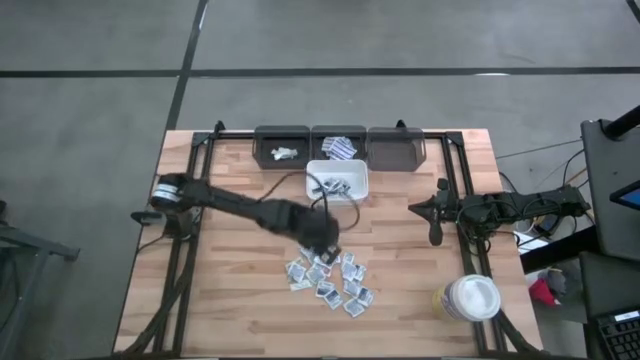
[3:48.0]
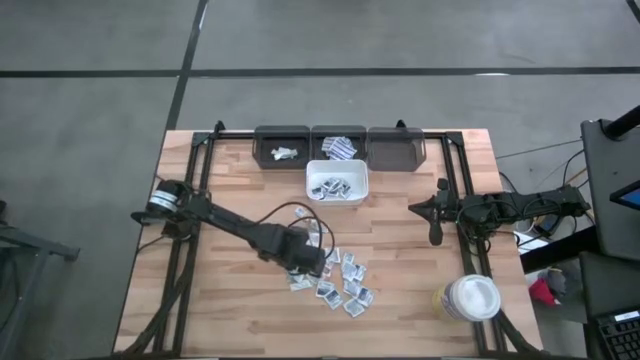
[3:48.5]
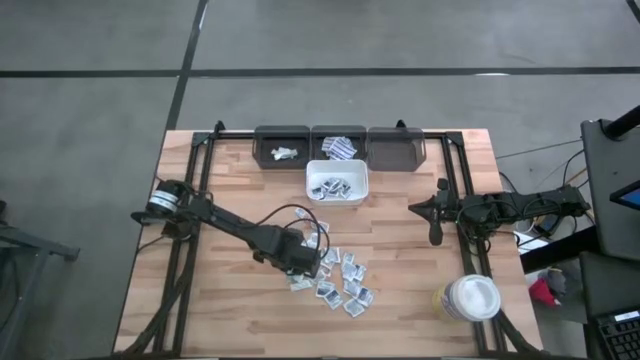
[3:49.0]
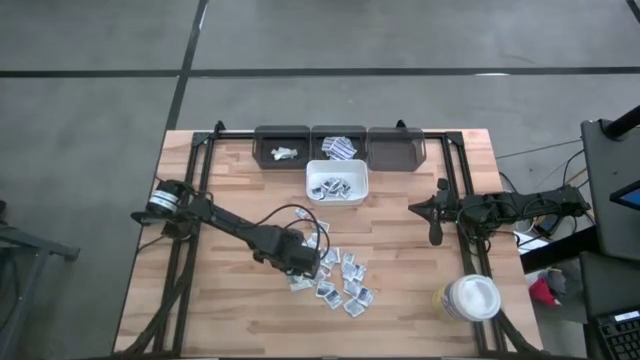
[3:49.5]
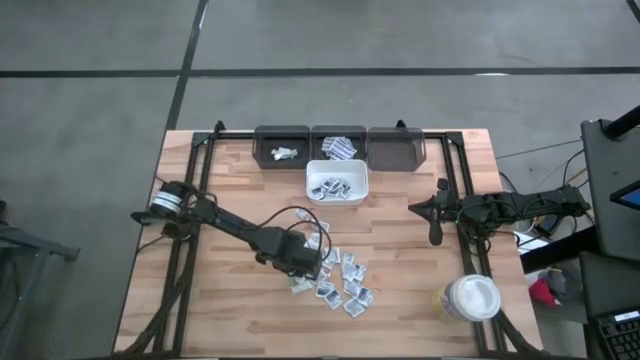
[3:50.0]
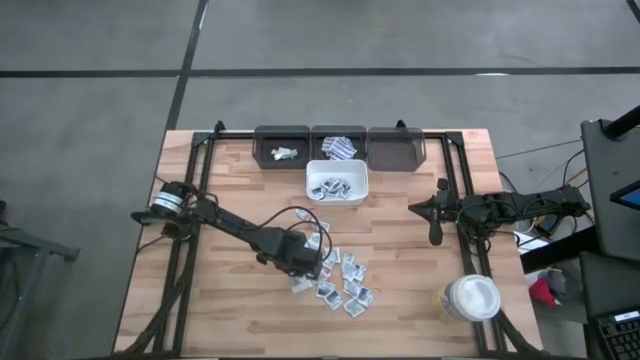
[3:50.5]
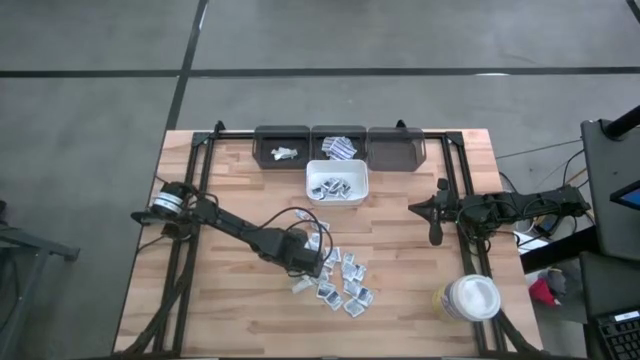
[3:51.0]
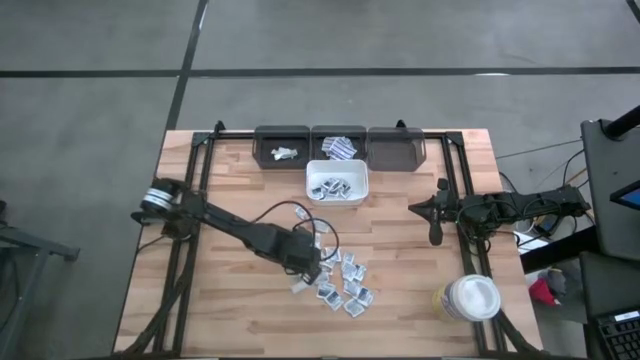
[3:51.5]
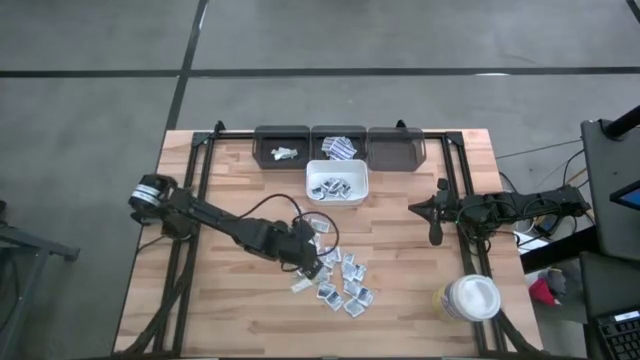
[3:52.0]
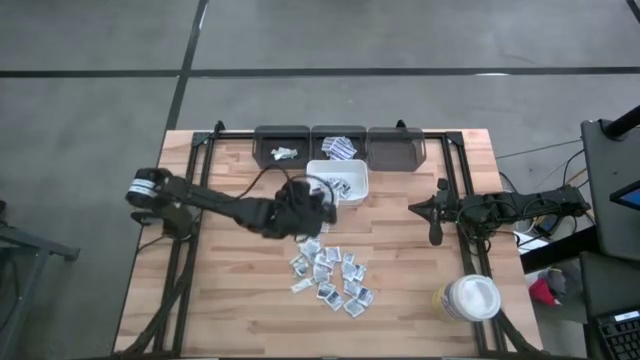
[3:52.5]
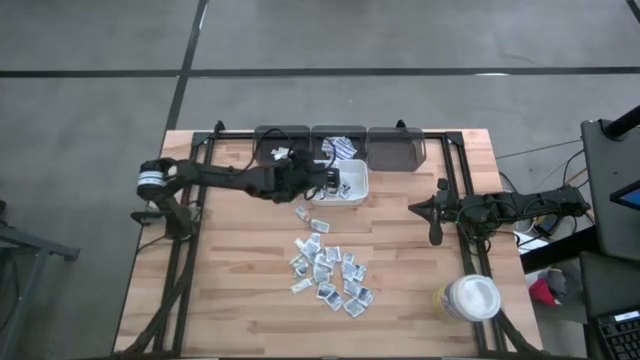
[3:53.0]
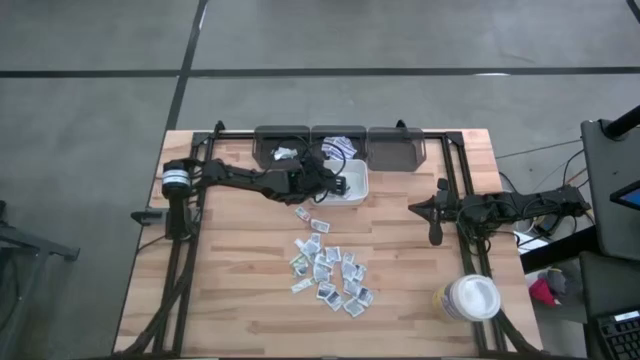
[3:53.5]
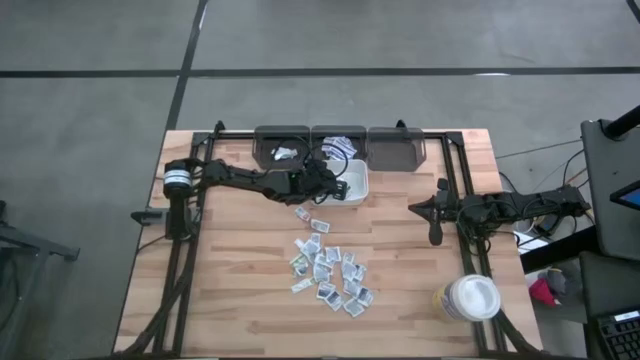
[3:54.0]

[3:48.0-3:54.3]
Task: Pick & Place First Aid Supplies
Put the blue alcohol pad into the white bin

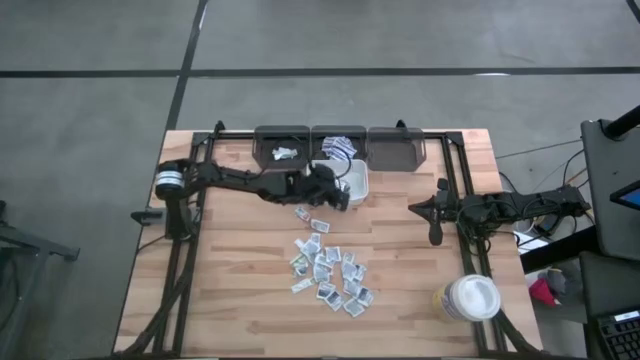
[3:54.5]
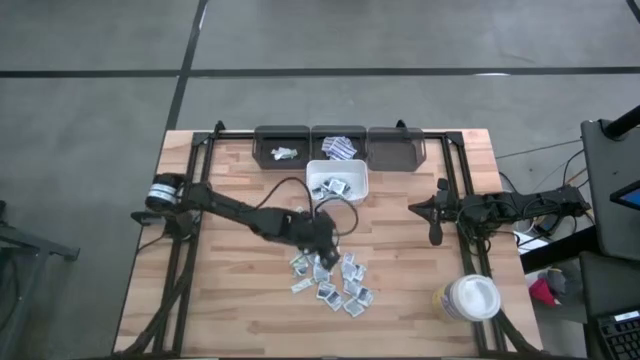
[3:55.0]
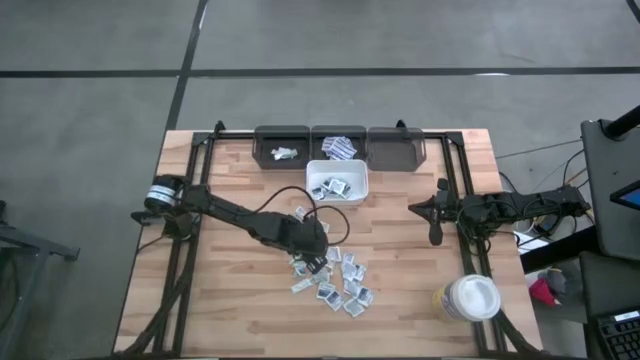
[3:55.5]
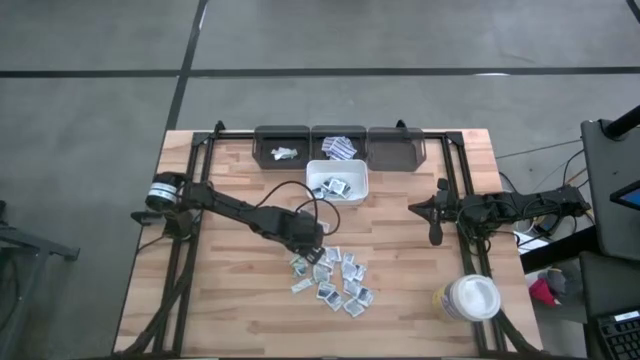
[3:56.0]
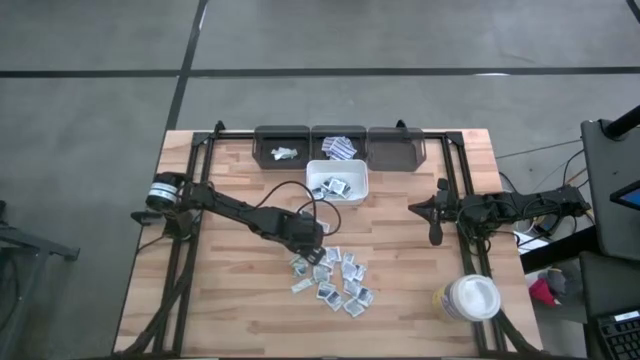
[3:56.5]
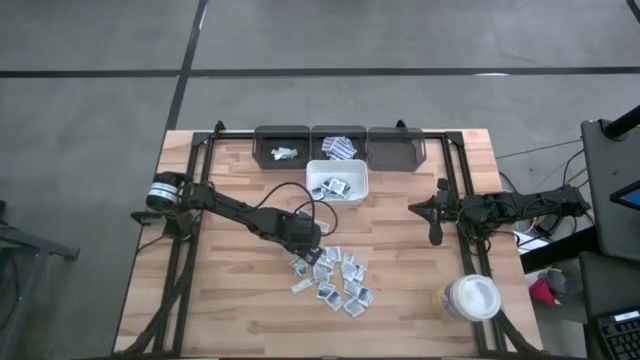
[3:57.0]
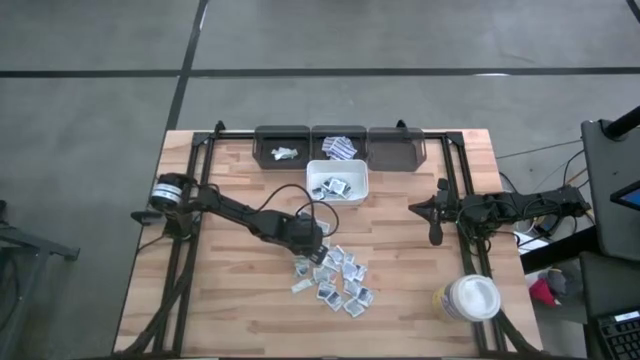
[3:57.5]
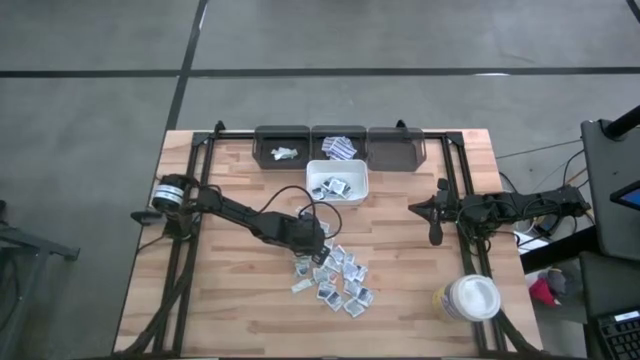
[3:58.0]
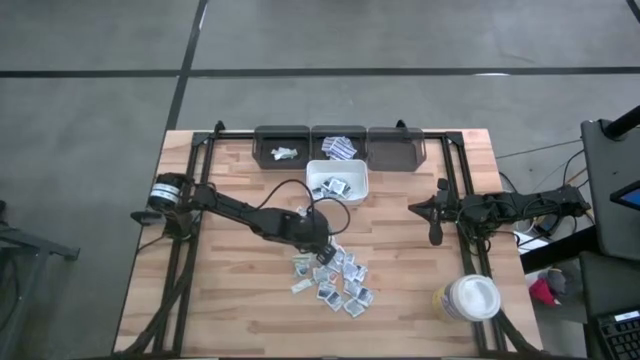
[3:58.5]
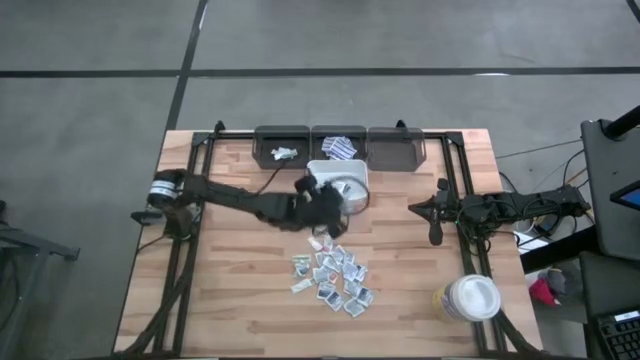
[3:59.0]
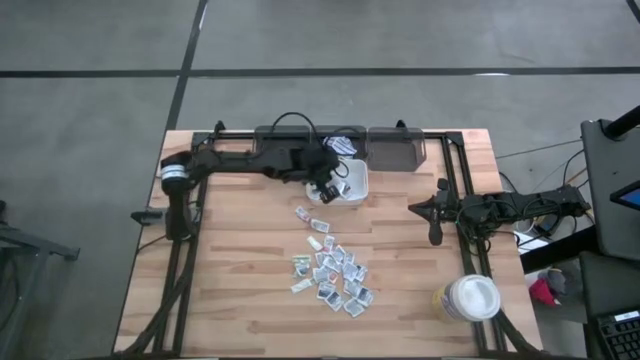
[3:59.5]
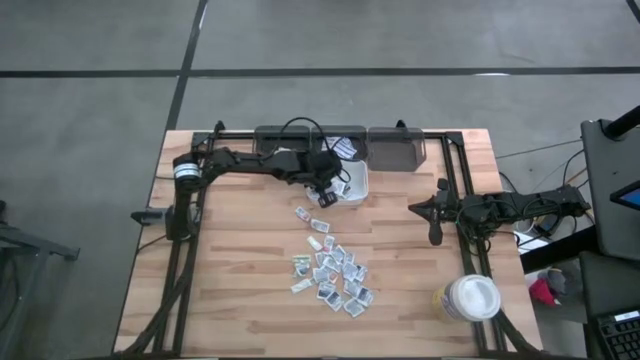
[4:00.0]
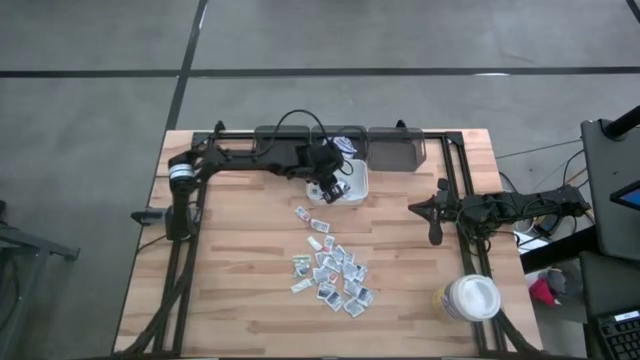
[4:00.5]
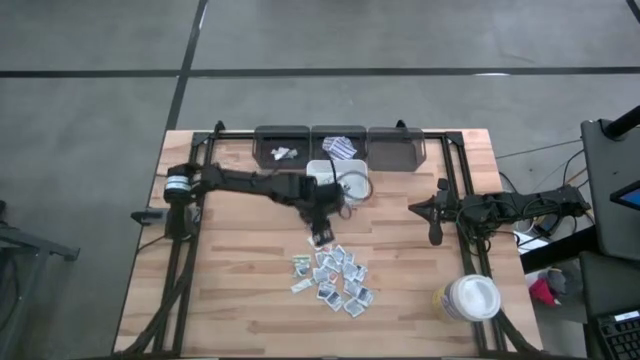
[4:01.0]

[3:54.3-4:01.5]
Put the blue alcohol pad into the white bin

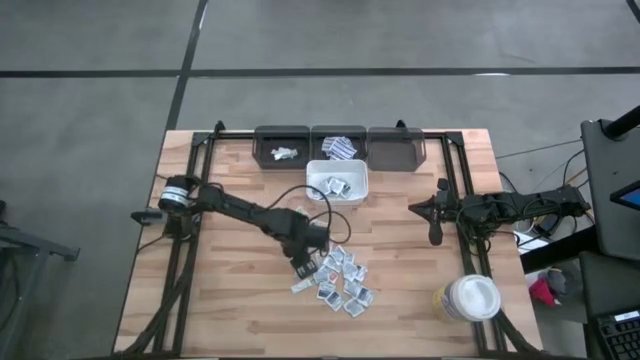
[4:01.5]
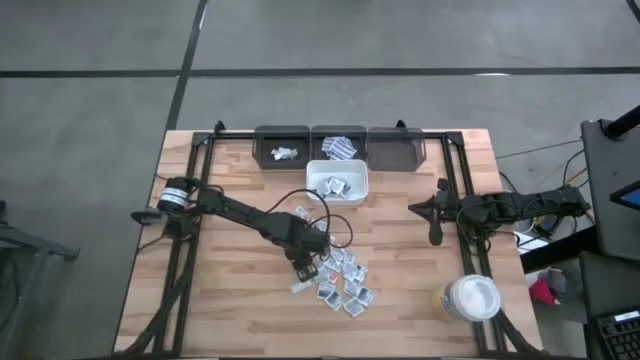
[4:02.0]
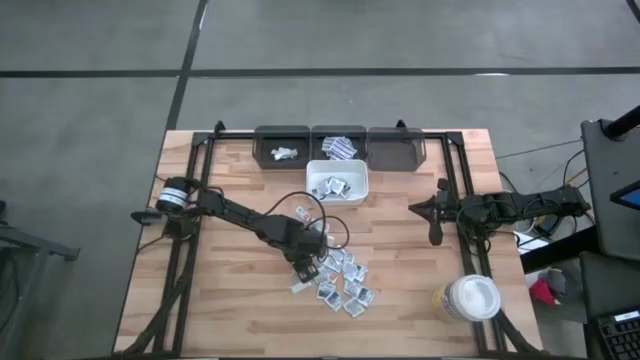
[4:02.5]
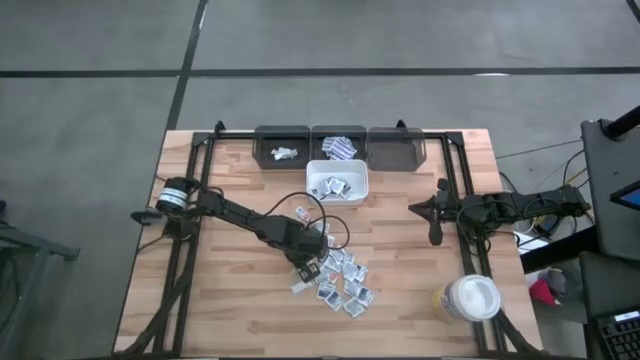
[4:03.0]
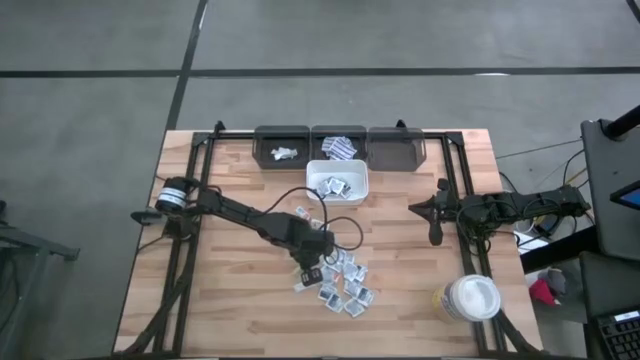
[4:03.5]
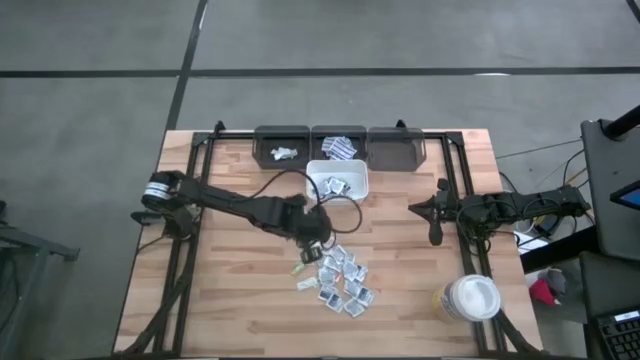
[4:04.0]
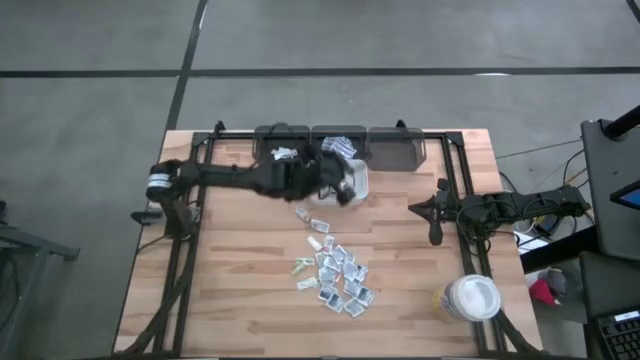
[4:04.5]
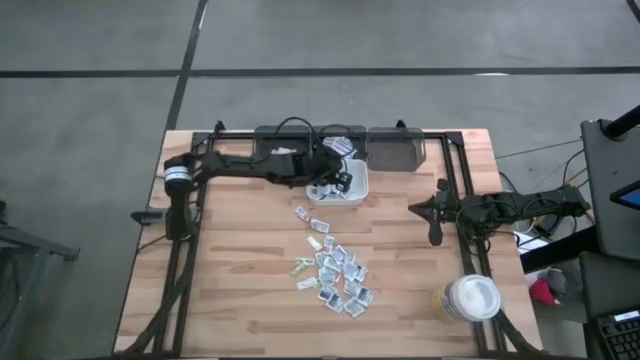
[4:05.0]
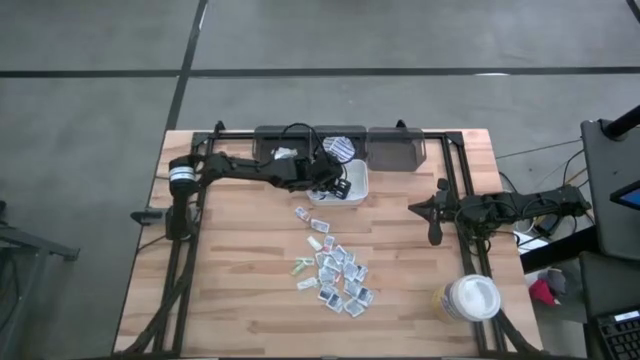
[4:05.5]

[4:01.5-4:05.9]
Put the blue alcohol pad into the white bin

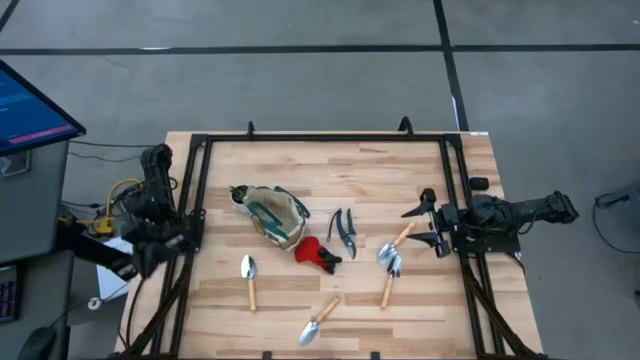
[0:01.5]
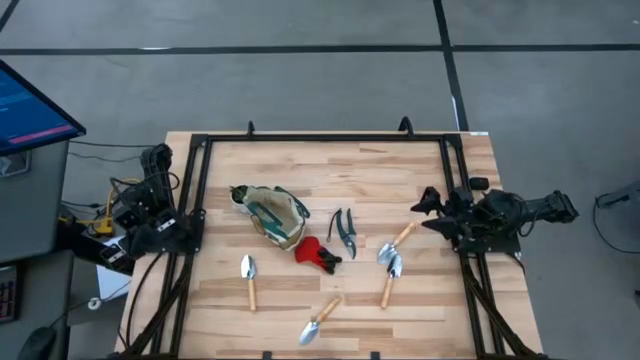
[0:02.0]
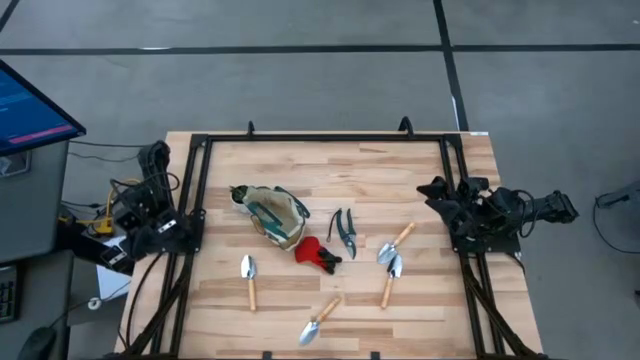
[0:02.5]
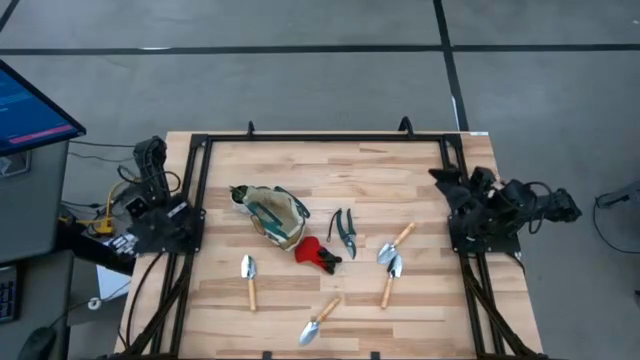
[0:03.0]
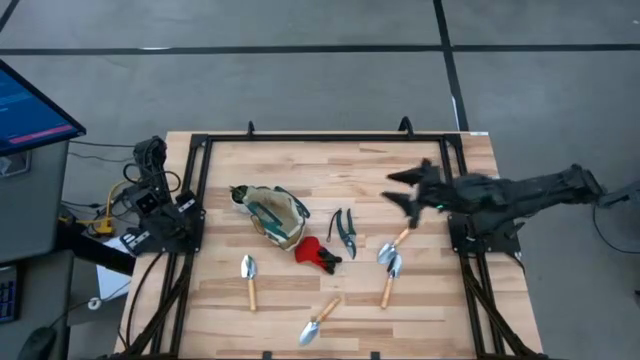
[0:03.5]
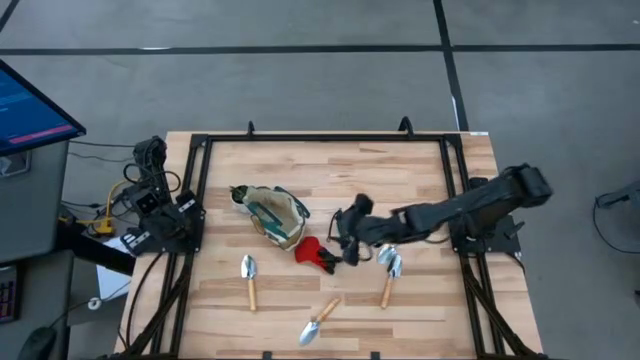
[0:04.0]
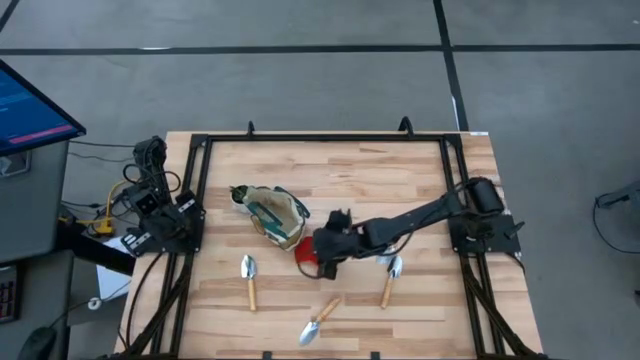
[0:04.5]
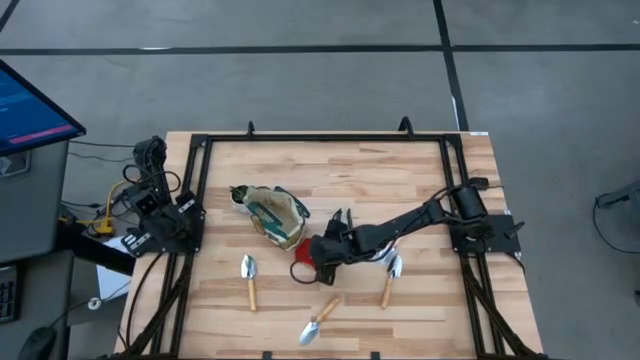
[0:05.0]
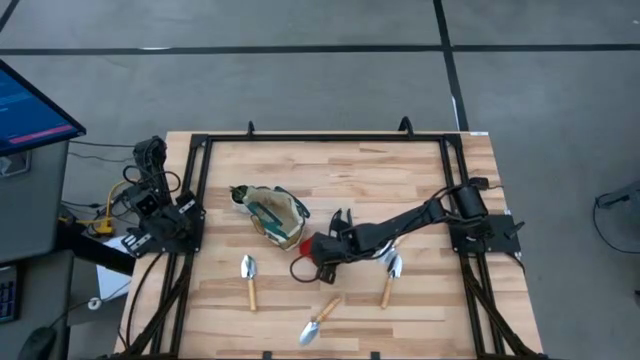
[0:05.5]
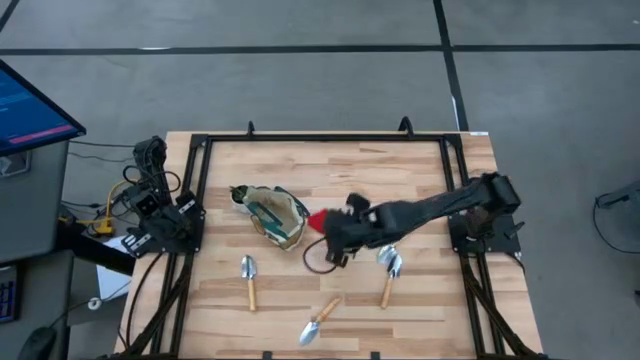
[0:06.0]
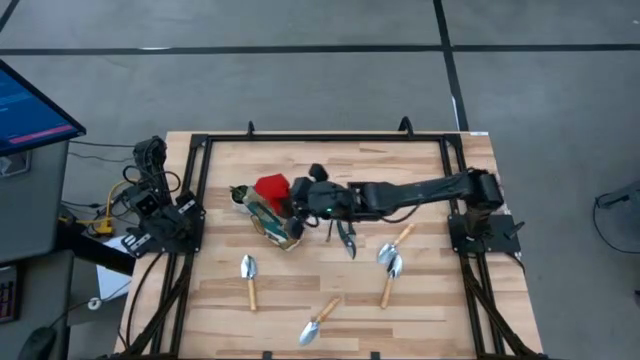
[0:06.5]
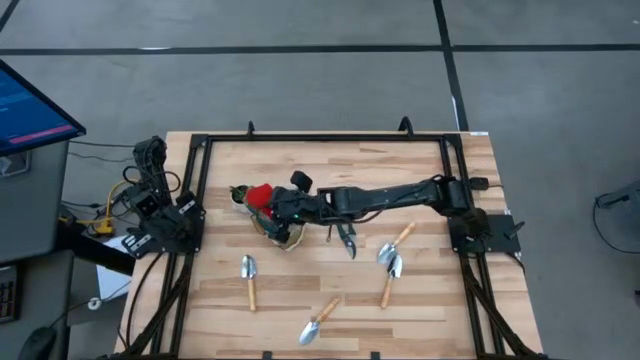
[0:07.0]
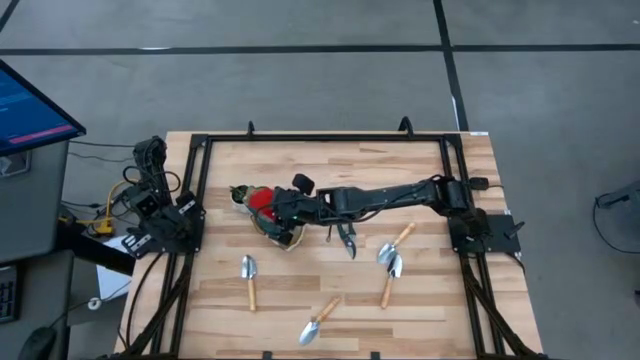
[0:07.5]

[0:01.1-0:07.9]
Task: Pick & Place Garden tools in Gardening bag
Put the gloves into the gardening bag
